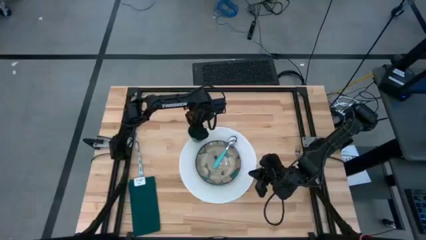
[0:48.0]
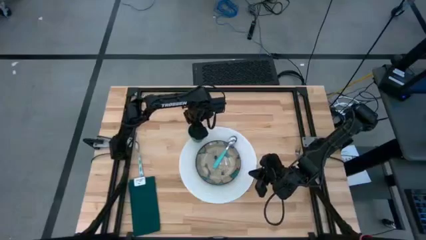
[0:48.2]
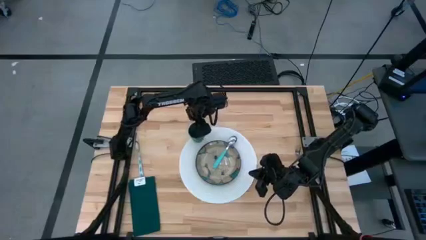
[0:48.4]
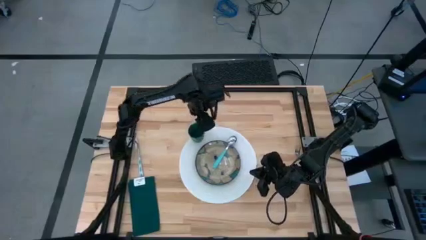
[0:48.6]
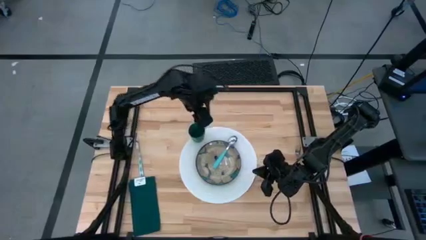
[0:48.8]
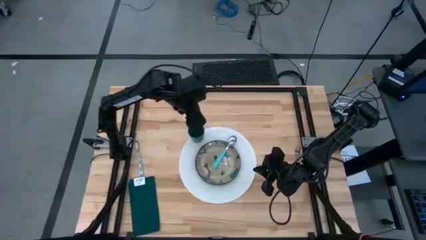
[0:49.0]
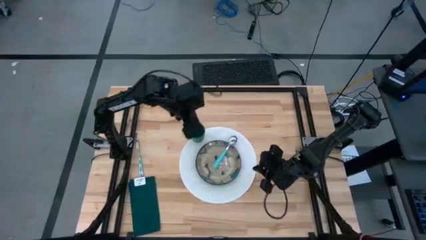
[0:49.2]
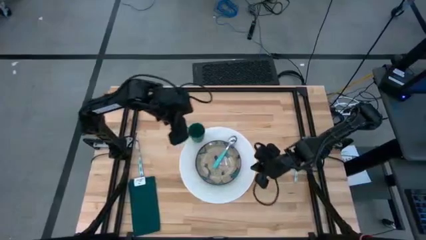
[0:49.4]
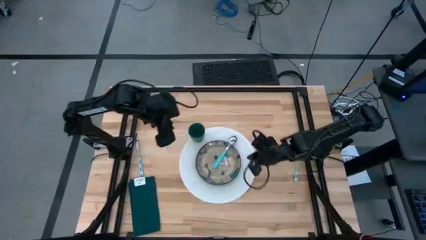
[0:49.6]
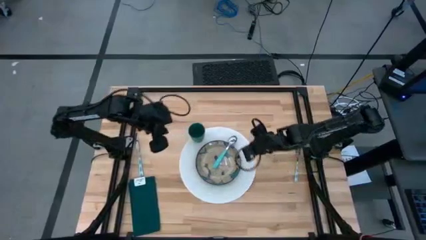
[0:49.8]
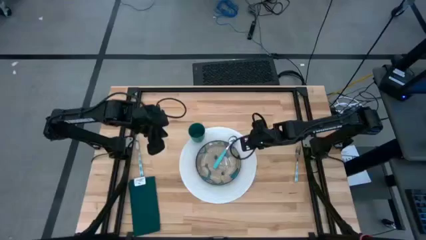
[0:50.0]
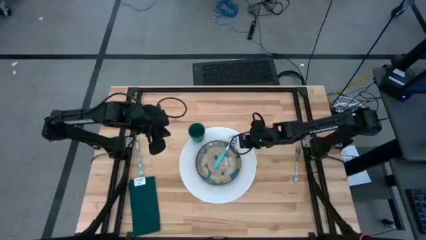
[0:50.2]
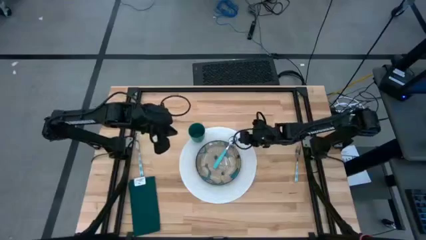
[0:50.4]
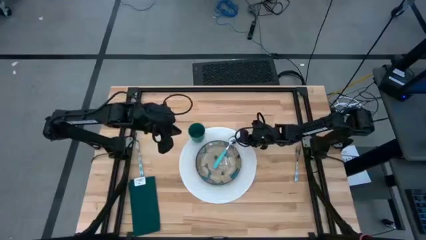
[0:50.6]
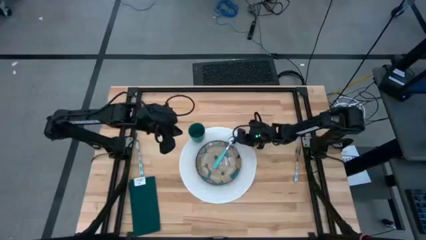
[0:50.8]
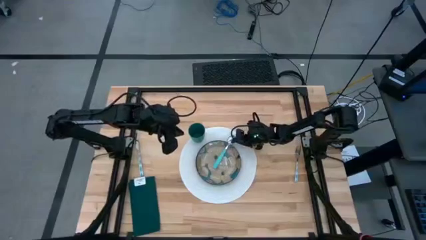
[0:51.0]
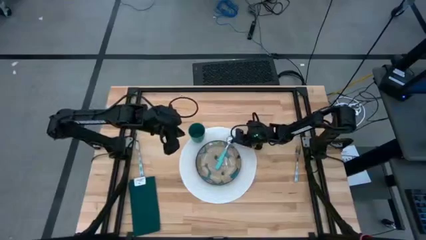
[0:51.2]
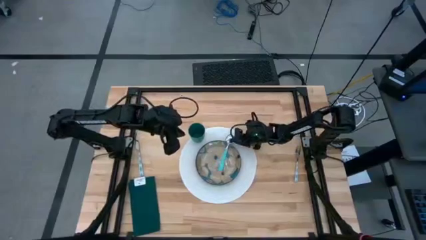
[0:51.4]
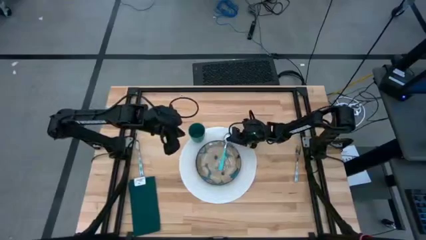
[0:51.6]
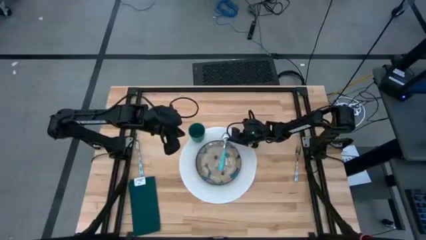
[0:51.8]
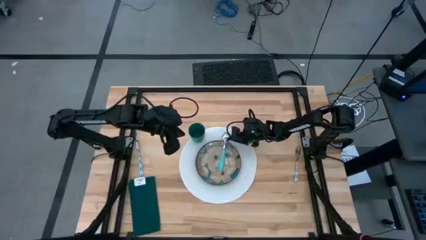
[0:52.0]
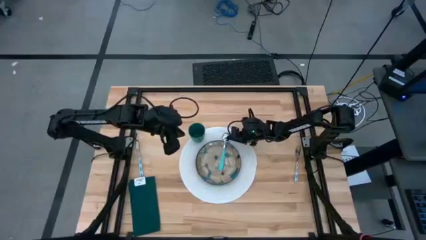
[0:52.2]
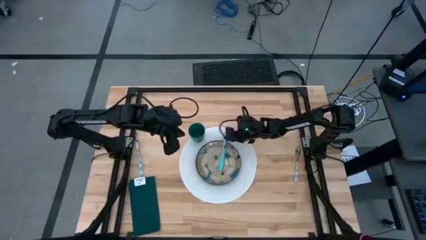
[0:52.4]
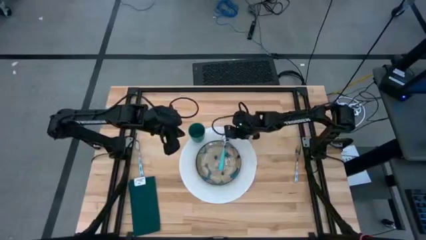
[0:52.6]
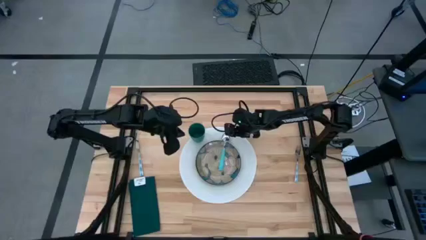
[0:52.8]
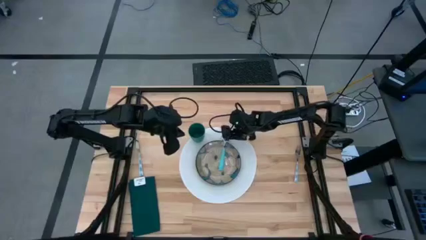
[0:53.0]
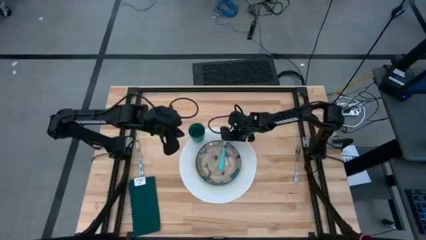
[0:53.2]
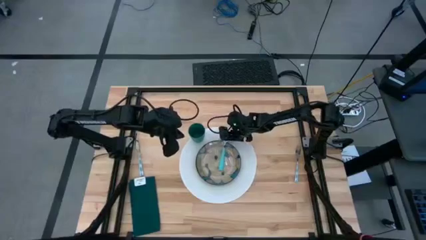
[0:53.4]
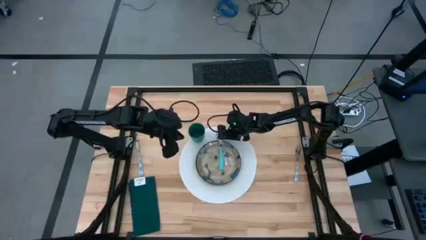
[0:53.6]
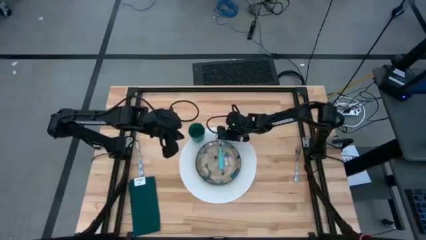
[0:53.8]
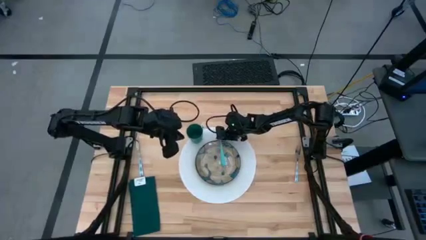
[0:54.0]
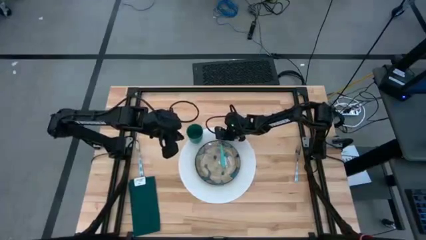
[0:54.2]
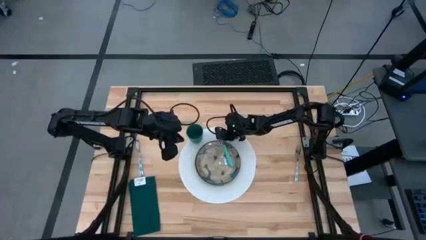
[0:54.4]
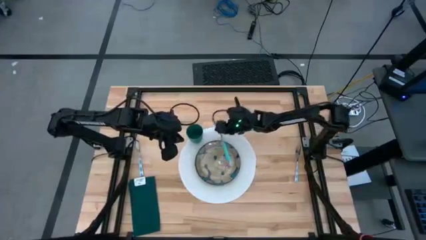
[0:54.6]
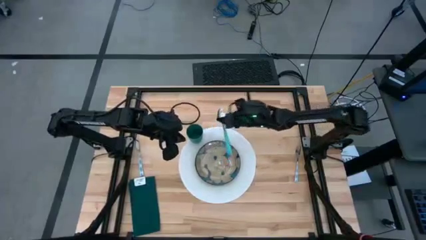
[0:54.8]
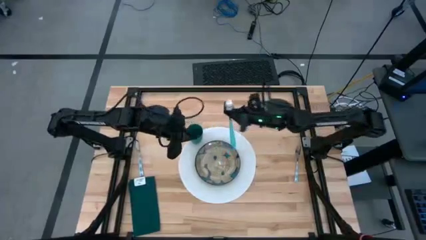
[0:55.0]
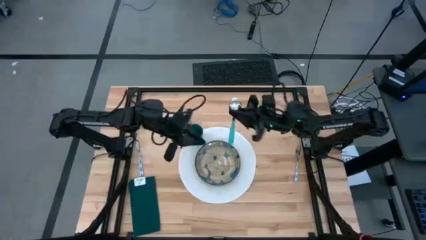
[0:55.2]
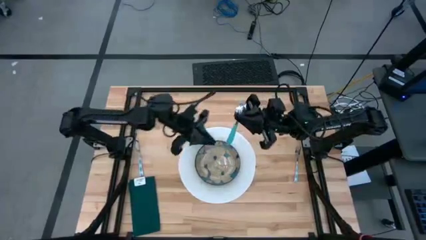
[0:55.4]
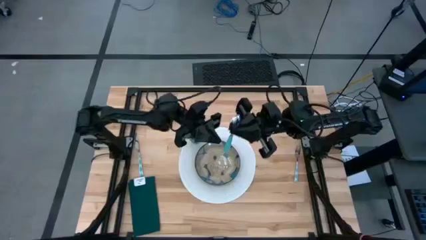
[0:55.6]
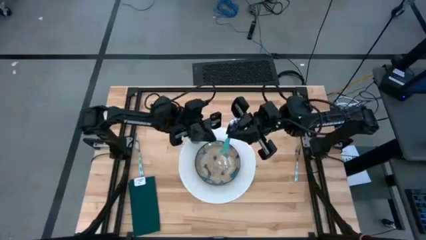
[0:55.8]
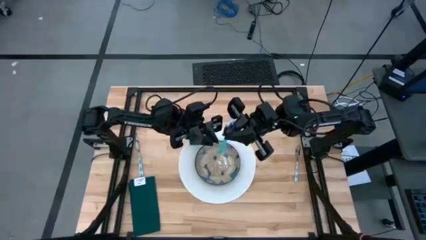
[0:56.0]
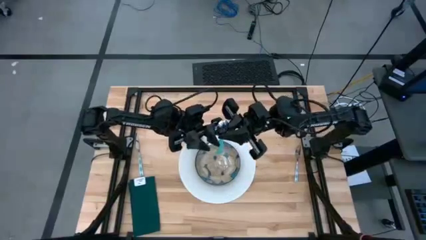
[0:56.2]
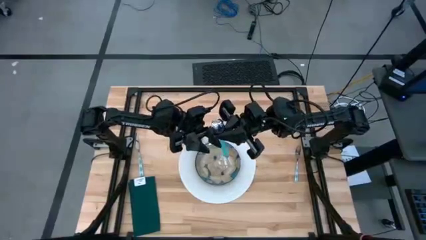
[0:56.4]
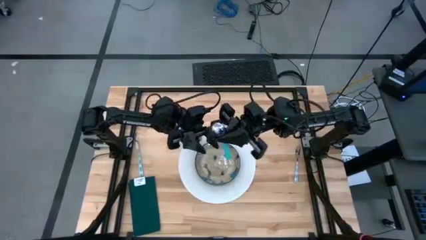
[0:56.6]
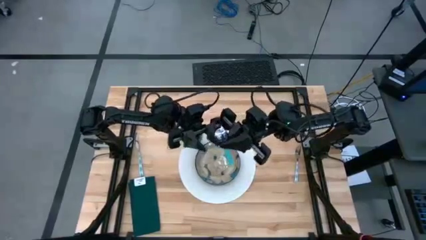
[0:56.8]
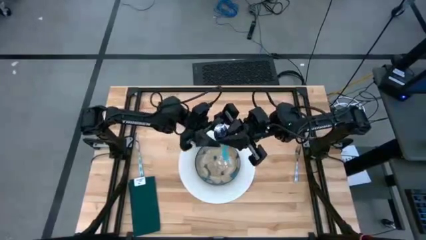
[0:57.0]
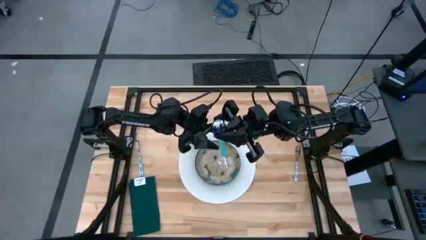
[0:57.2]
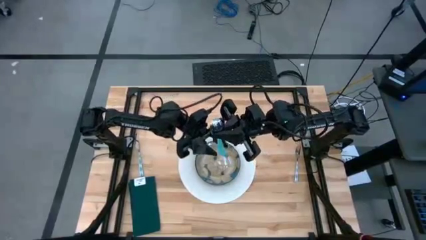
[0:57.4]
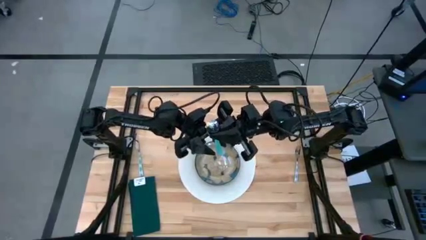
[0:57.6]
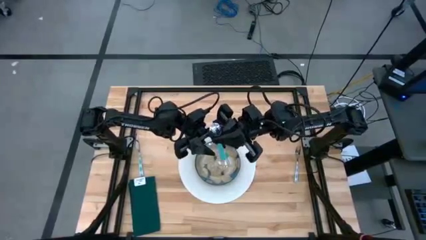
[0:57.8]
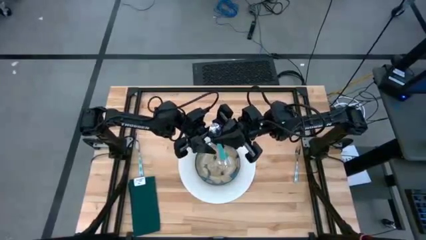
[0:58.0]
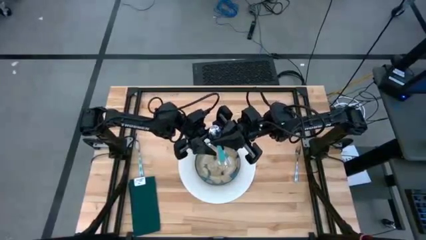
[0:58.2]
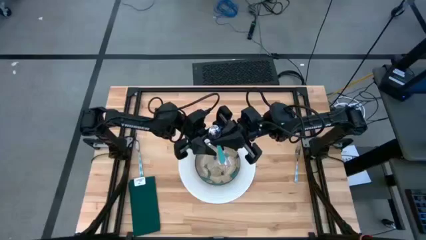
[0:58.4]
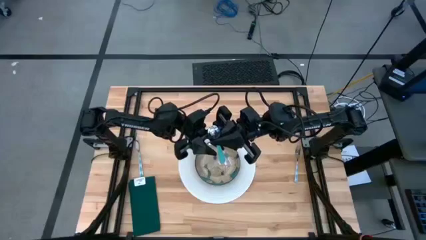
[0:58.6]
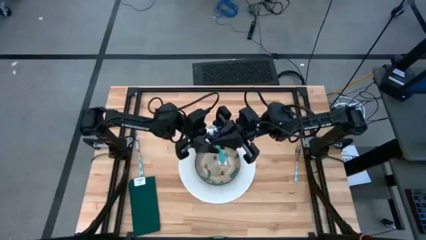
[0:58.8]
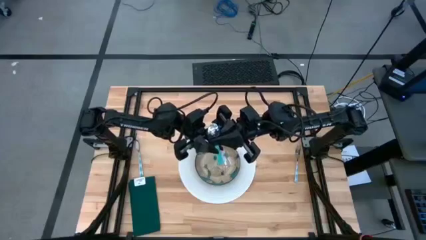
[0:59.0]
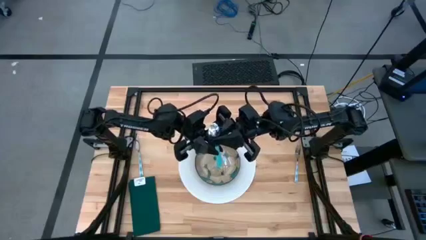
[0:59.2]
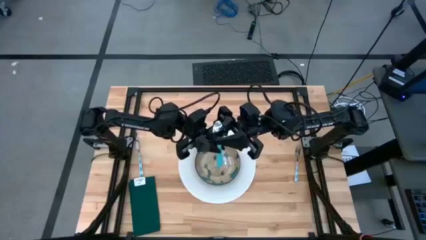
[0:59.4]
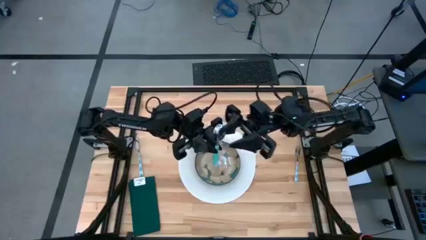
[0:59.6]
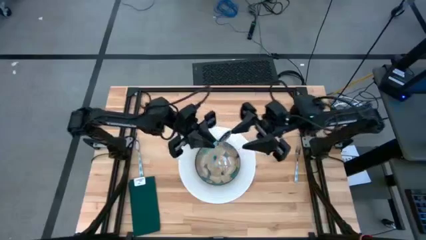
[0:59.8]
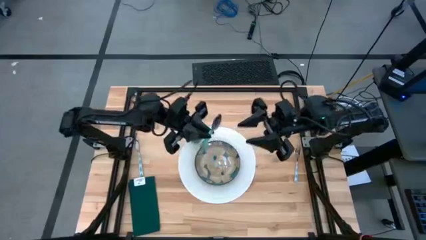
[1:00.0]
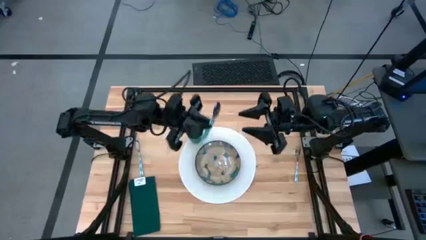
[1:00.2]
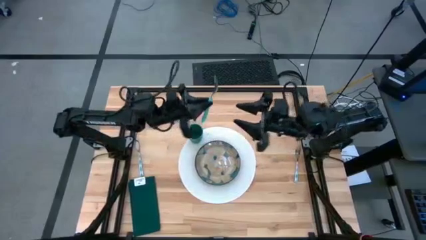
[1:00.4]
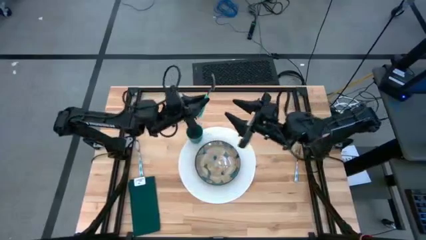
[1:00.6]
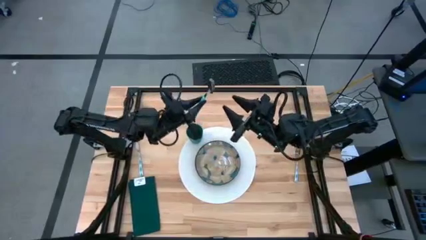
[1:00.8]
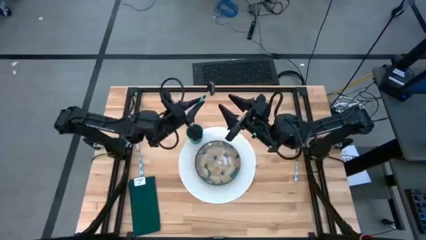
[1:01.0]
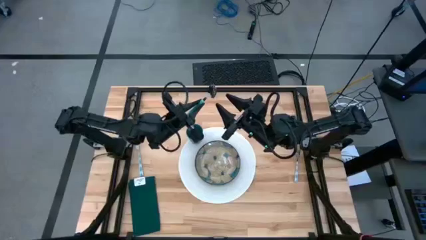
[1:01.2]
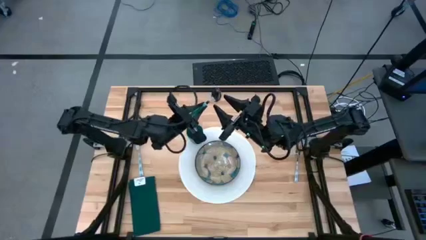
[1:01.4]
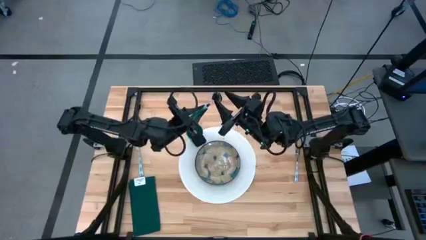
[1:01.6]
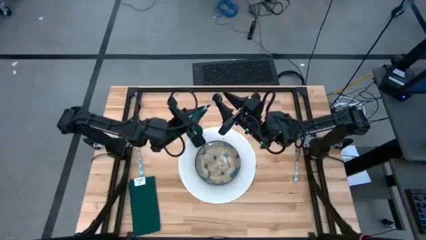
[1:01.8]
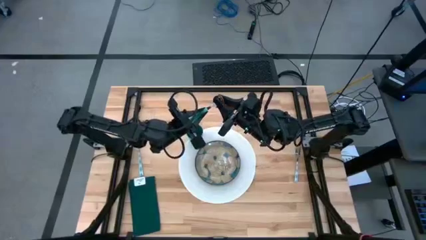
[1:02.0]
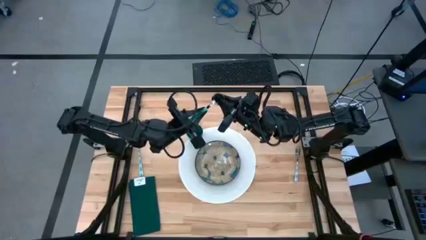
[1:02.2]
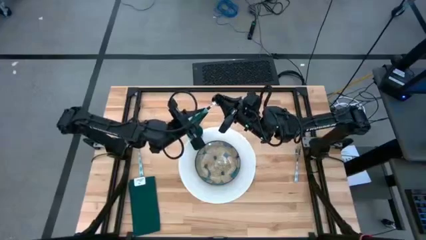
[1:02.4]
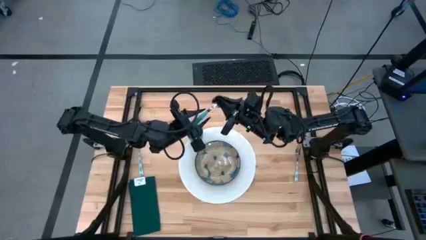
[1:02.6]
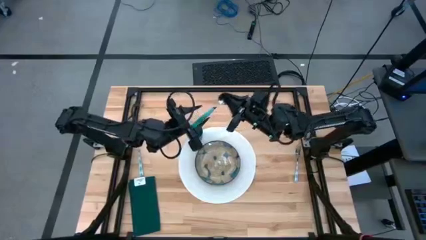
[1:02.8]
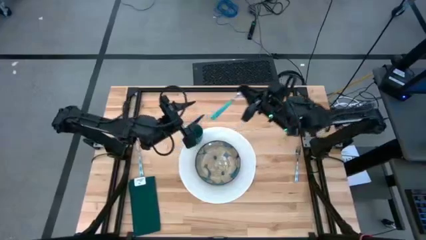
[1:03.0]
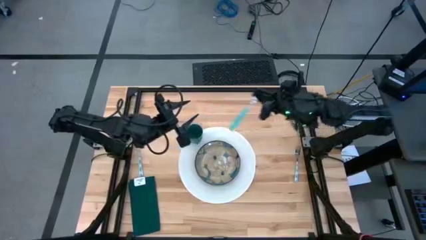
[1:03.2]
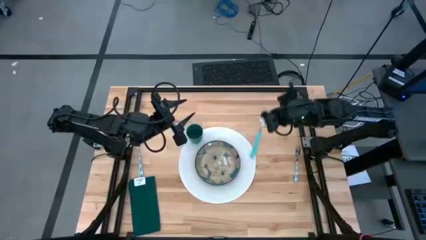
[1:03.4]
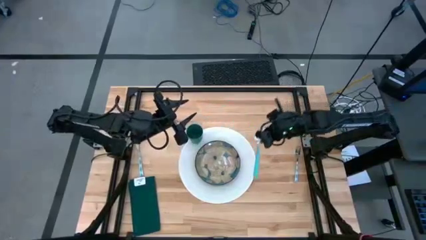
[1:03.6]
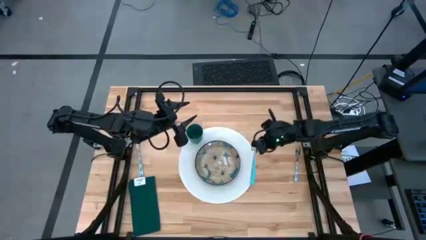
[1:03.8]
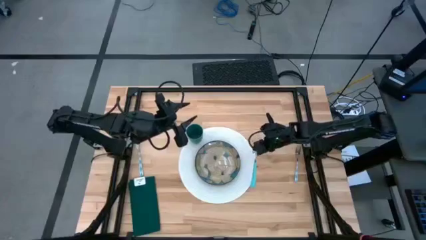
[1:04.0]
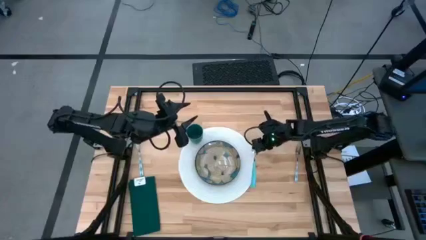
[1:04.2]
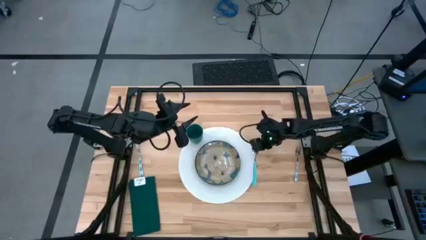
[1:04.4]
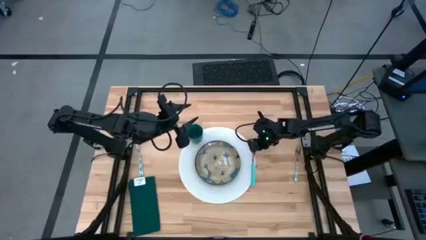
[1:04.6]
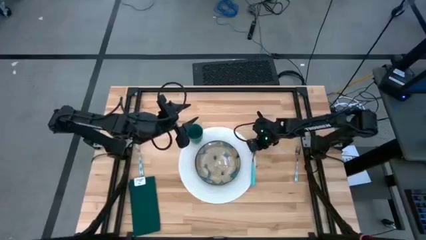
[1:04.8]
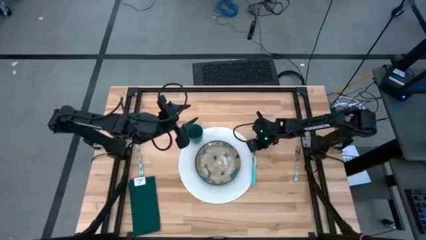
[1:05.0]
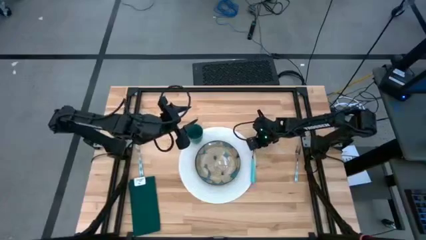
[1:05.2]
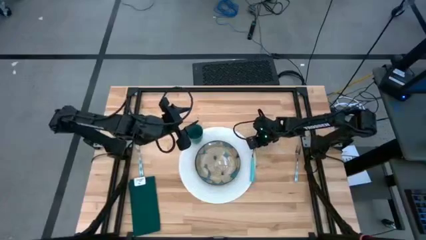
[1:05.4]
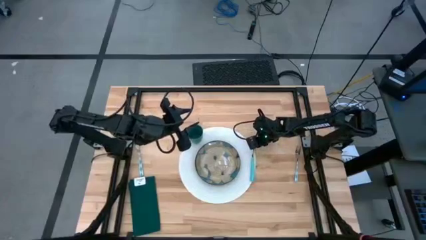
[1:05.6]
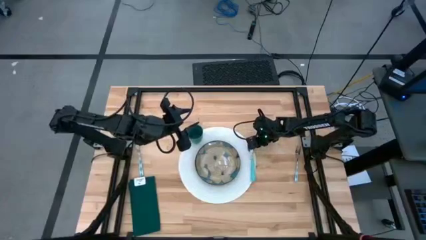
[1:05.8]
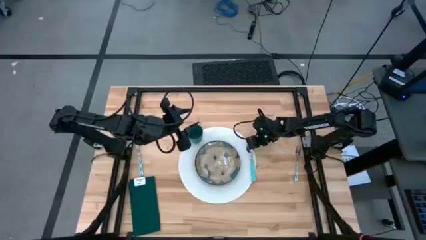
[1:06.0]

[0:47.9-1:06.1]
Task: Set table place
Put the blue spoon on the right side of the white table mat
